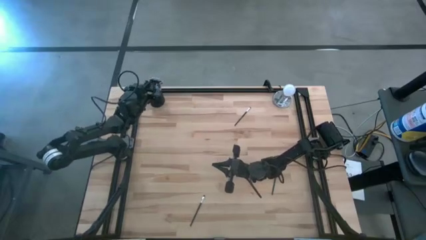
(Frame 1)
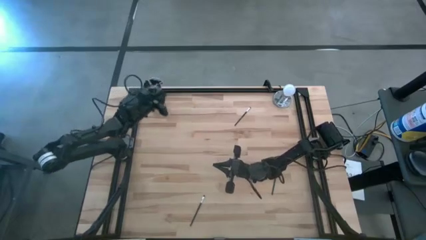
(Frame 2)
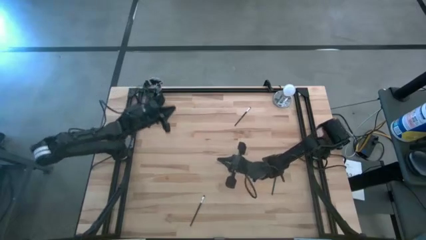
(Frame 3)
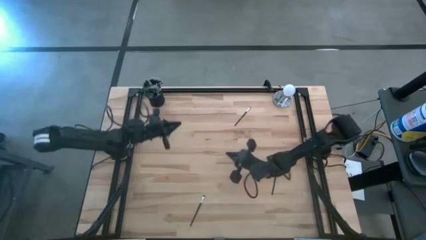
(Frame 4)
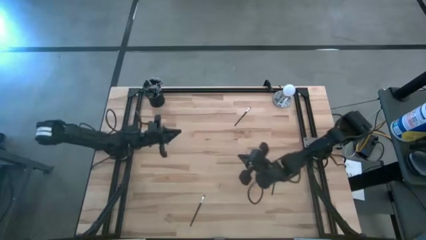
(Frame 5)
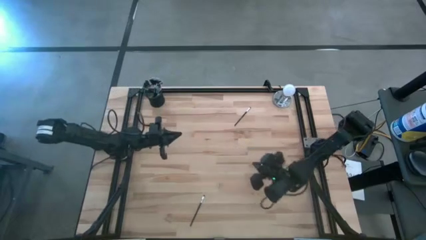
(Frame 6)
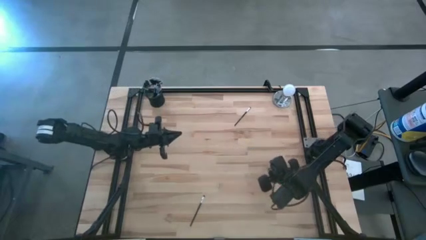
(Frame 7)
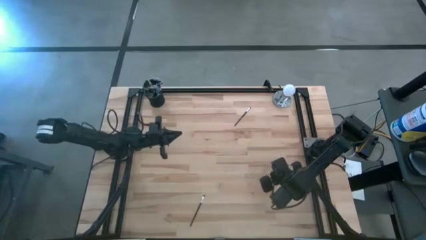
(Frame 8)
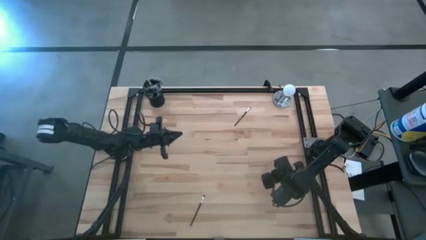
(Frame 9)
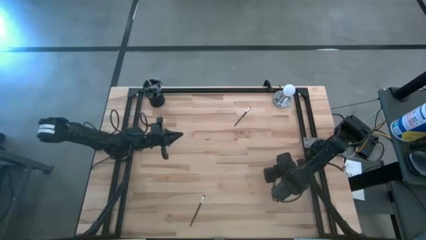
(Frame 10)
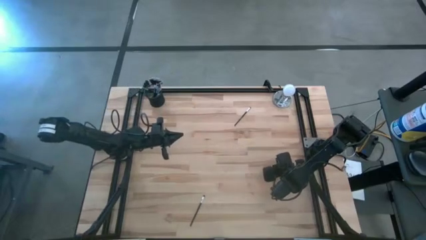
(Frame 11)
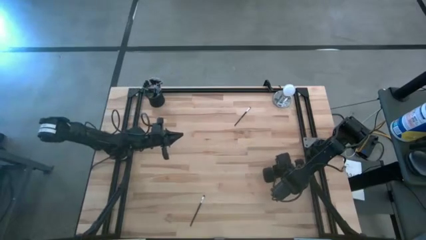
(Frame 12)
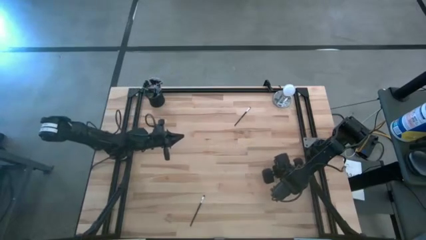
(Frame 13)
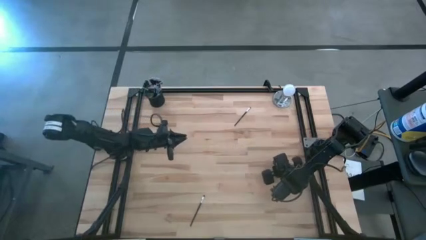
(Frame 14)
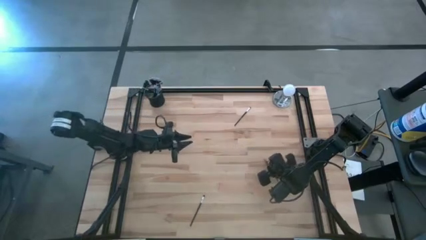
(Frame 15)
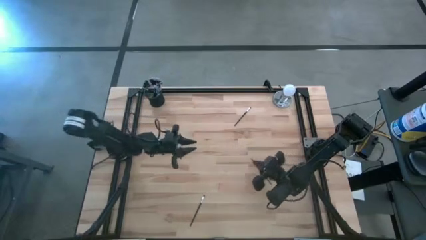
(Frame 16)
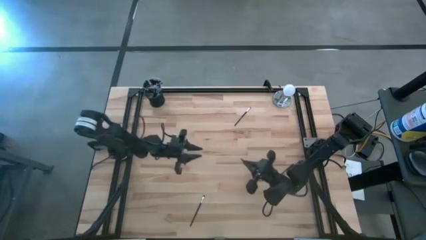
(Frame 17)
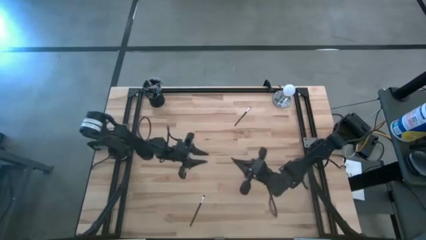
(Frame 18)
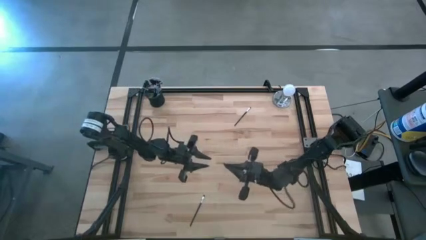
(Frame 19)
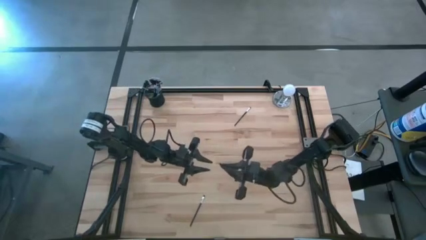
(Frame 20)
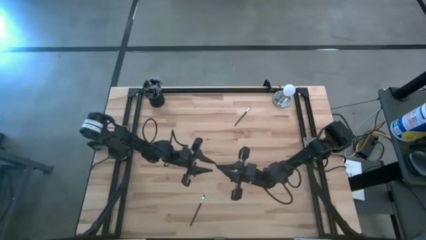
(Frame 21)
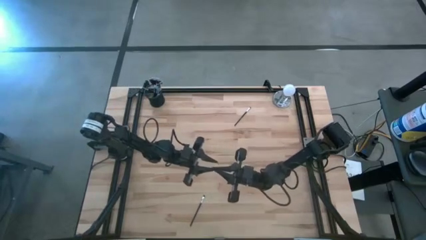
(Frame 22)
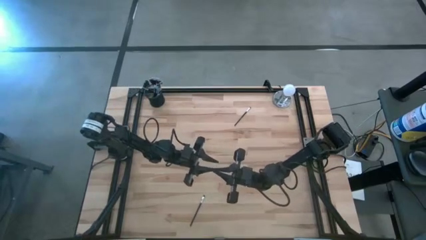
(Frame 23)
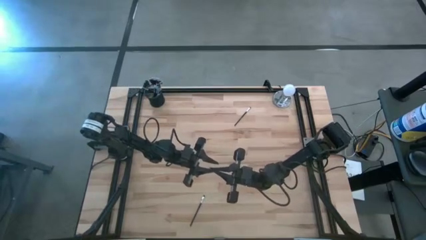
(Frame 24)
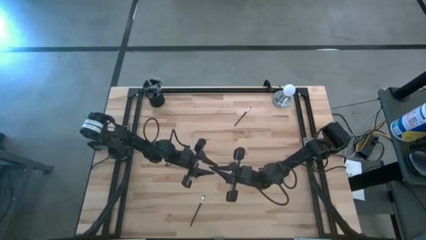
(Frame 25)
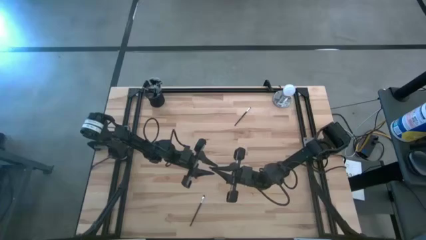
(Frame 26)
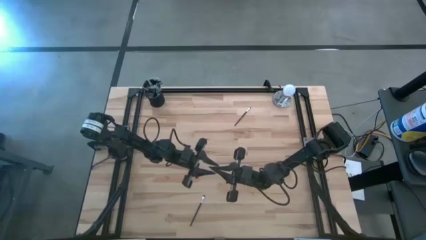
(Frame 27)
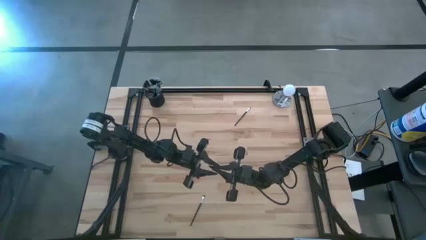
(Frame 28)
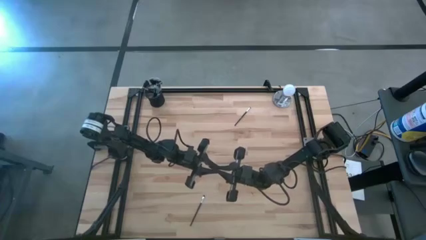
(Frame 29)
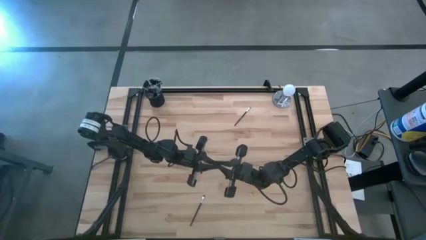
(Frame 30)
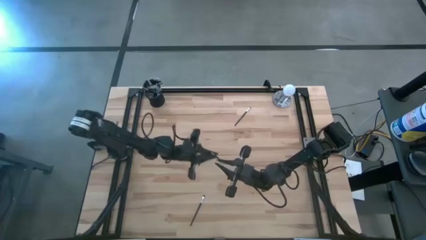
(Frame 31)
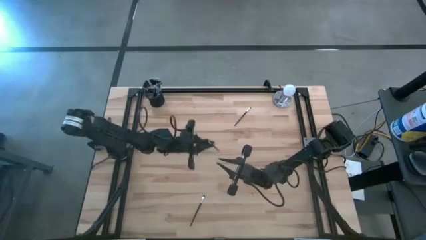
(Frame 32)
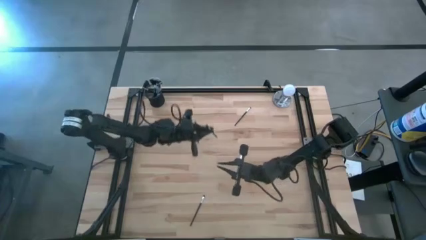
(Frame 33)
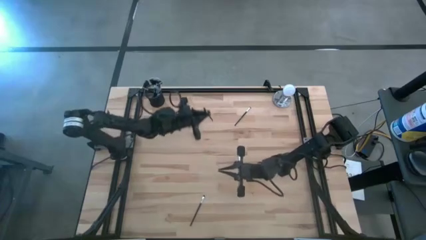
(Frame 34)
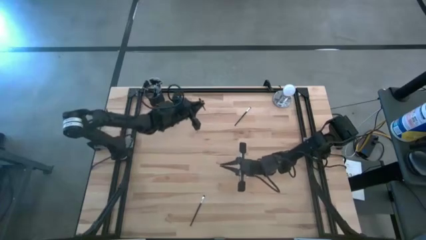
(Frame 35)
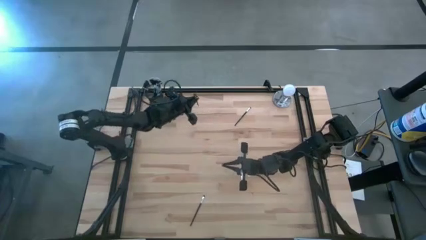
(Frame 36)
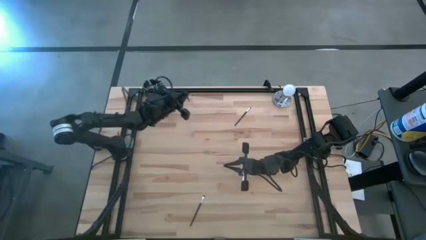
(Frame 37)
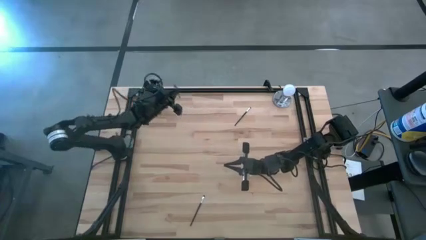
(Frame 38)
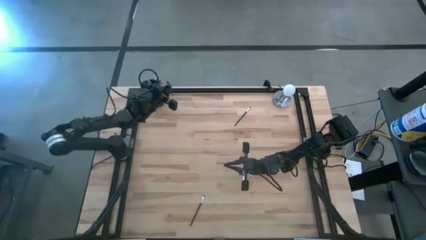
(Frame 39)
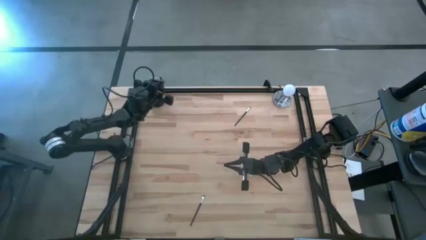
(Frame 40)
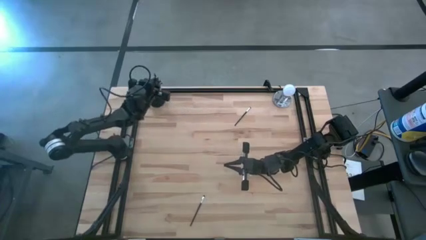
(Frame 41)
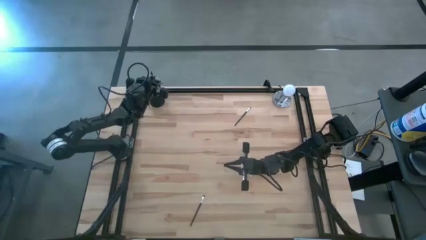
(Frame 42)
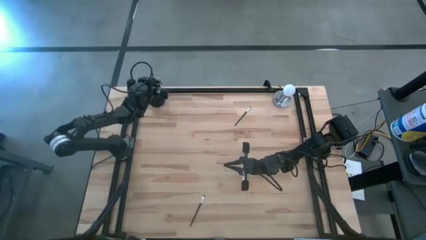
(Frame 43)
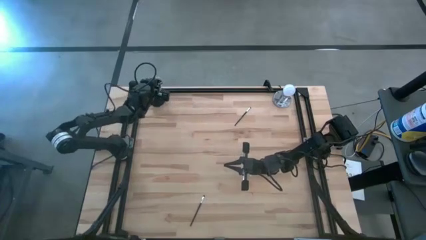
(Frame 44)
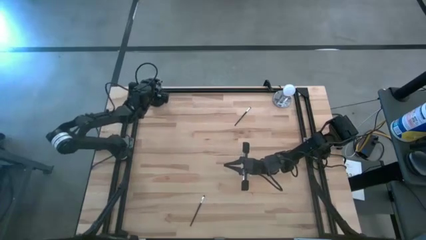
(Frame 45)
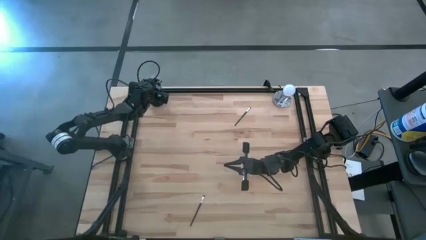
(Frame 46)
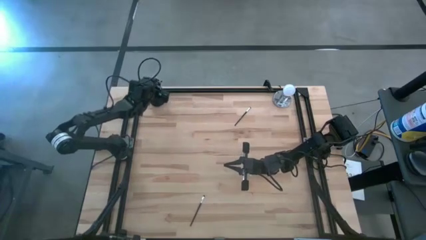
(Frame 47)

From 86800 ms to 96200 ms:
Task: Pick & Place Makeup Supplies
Put the right makeup brush into the makeup holder

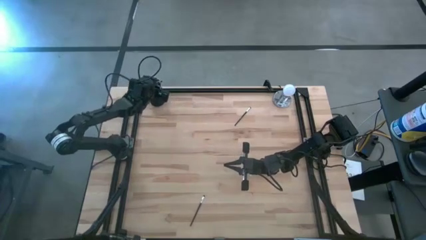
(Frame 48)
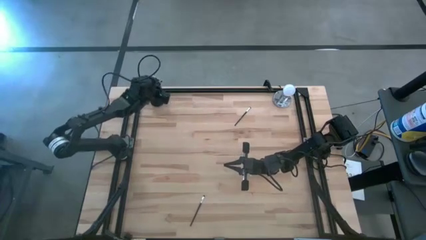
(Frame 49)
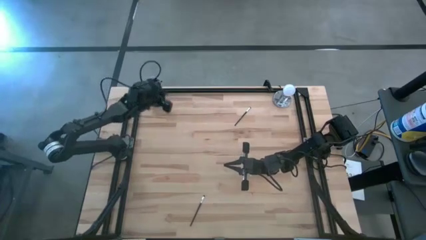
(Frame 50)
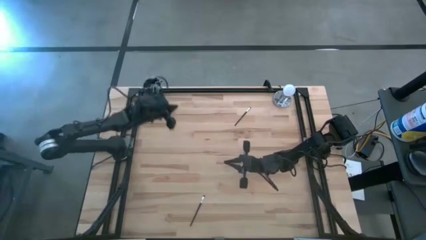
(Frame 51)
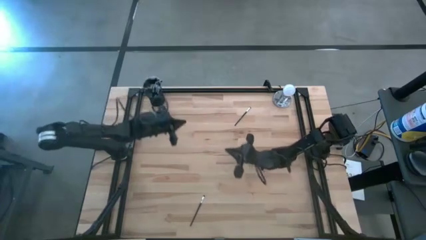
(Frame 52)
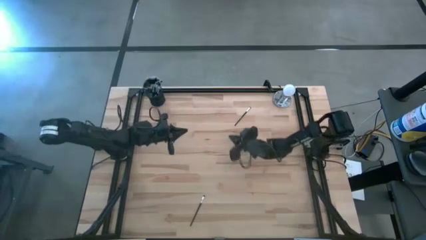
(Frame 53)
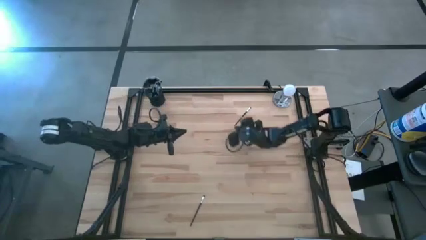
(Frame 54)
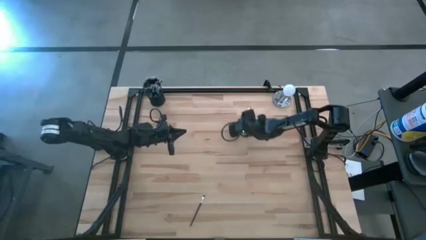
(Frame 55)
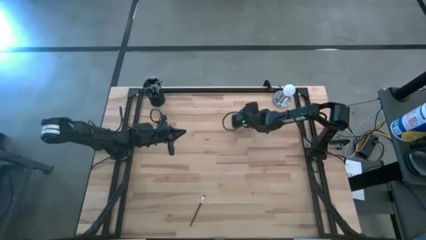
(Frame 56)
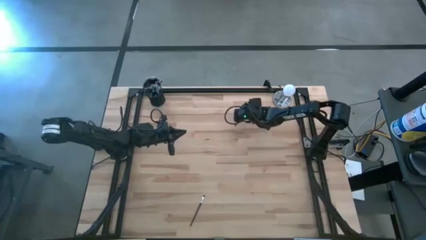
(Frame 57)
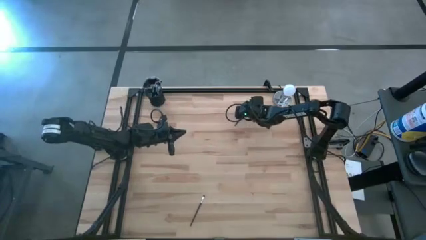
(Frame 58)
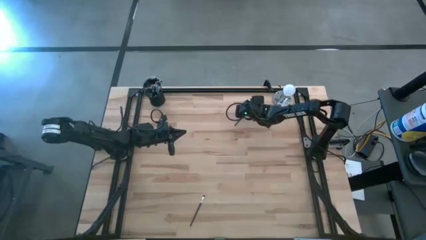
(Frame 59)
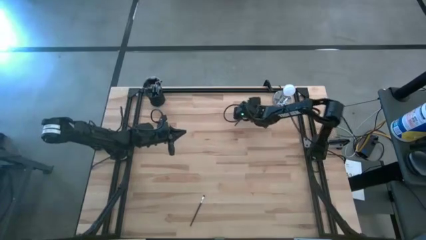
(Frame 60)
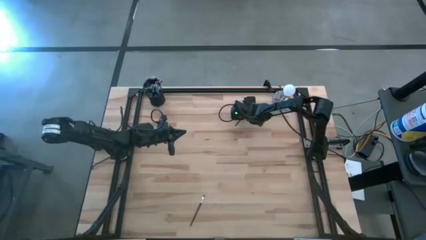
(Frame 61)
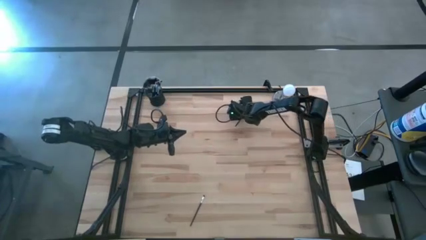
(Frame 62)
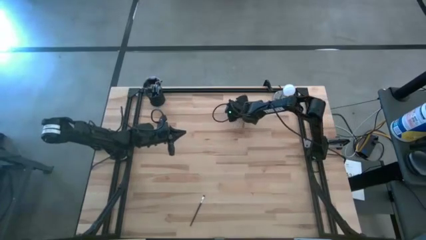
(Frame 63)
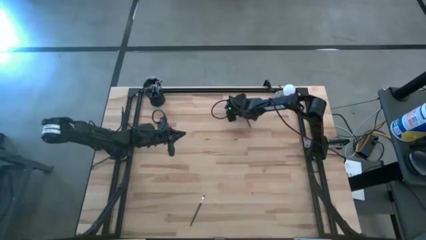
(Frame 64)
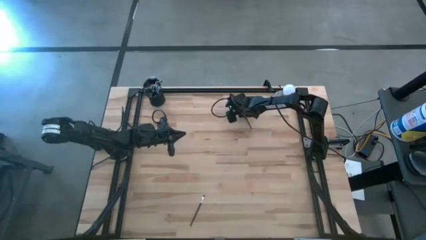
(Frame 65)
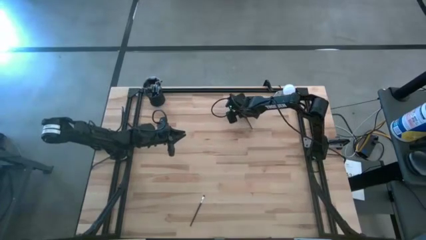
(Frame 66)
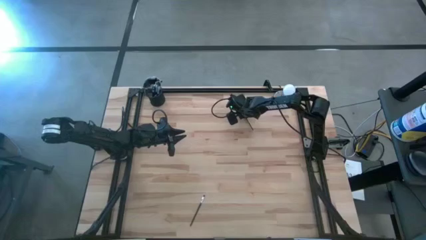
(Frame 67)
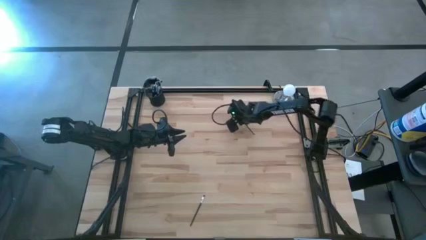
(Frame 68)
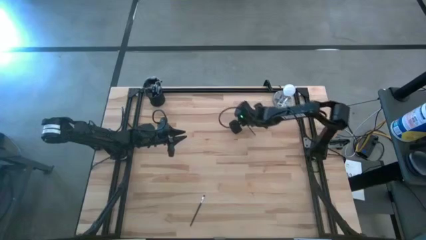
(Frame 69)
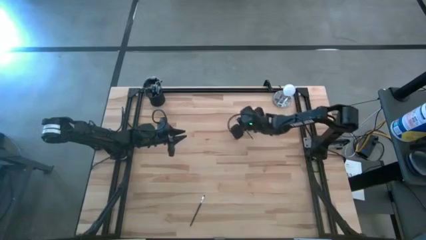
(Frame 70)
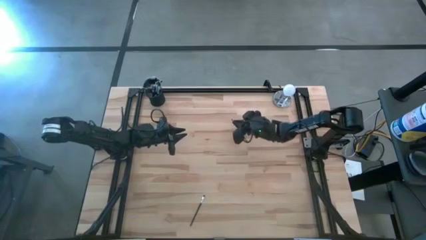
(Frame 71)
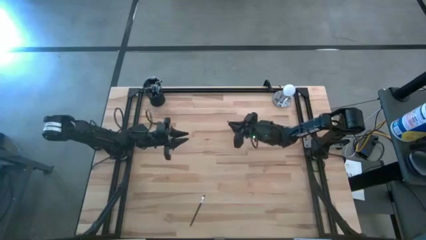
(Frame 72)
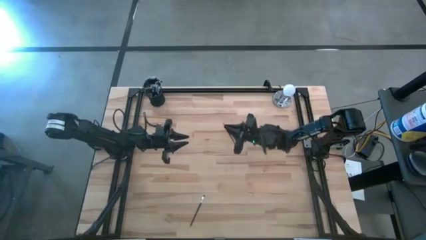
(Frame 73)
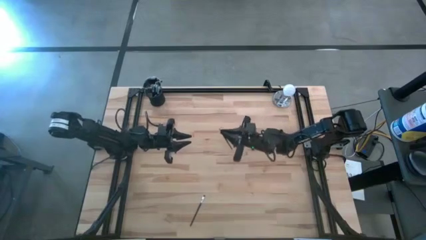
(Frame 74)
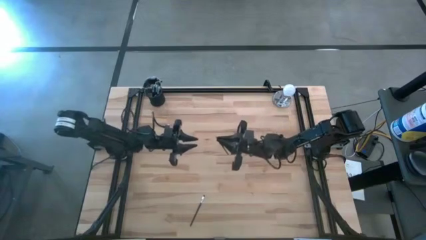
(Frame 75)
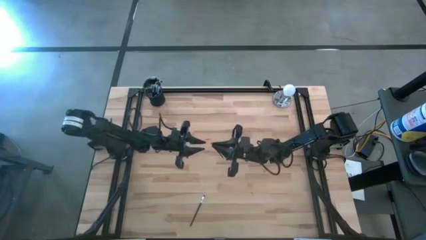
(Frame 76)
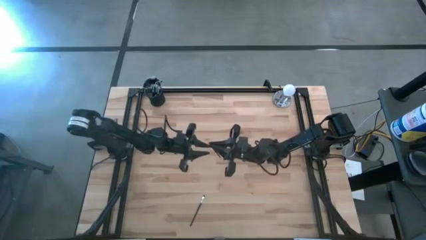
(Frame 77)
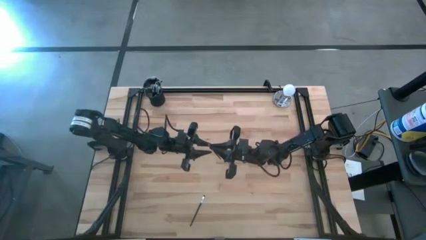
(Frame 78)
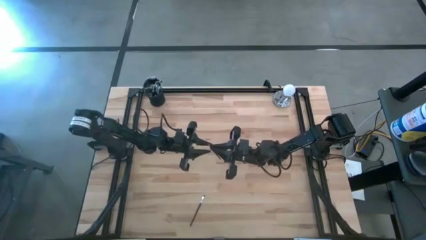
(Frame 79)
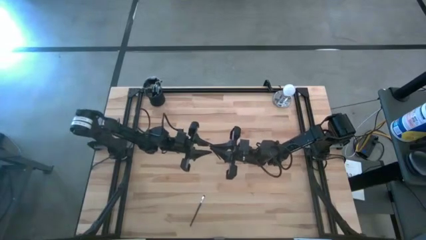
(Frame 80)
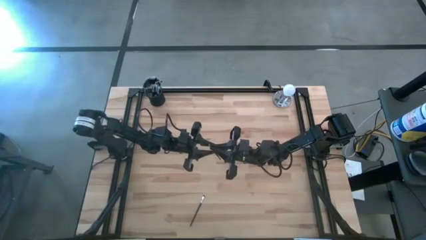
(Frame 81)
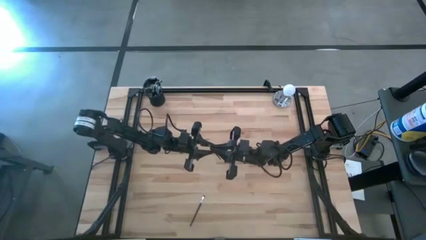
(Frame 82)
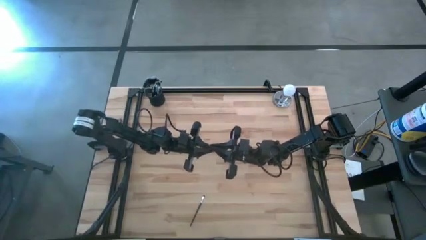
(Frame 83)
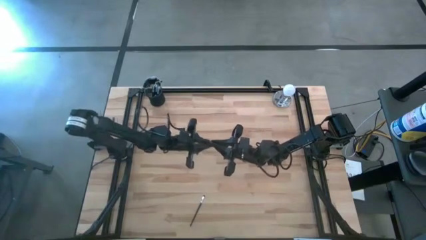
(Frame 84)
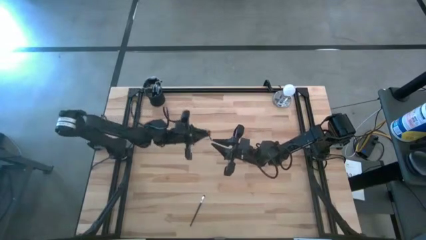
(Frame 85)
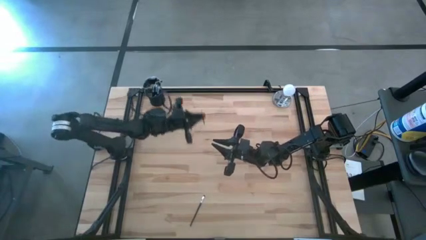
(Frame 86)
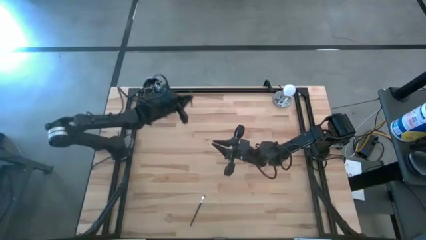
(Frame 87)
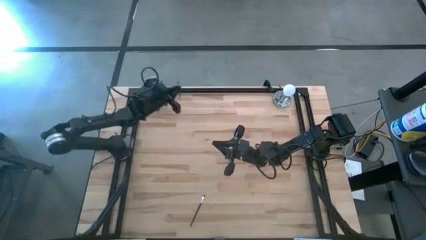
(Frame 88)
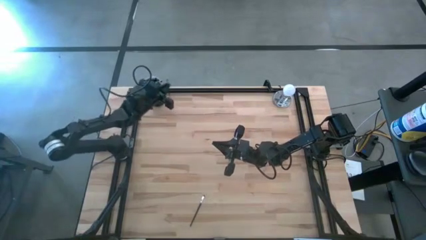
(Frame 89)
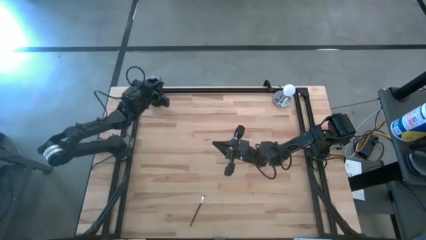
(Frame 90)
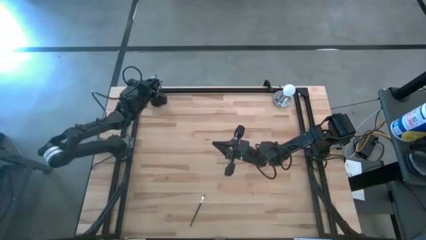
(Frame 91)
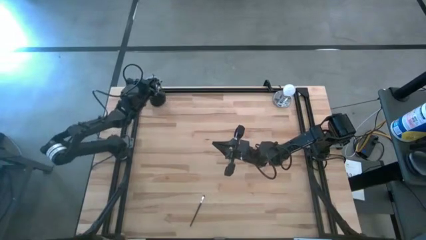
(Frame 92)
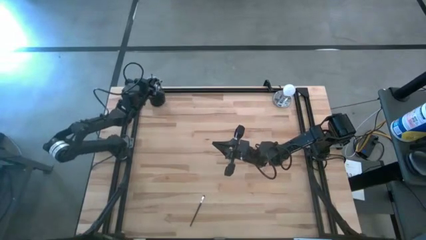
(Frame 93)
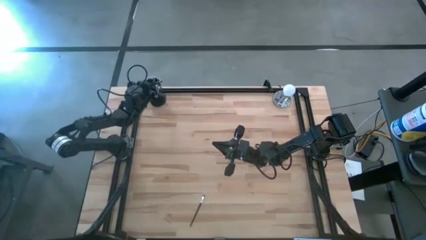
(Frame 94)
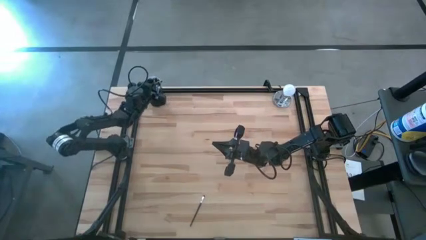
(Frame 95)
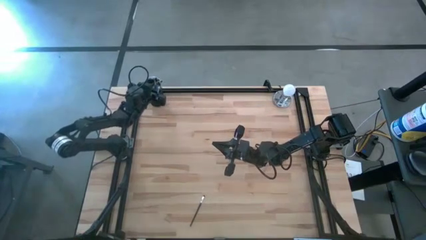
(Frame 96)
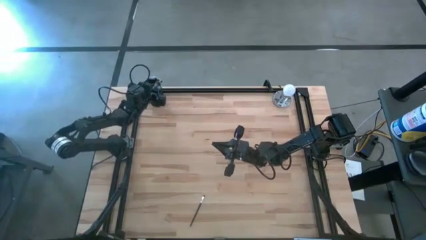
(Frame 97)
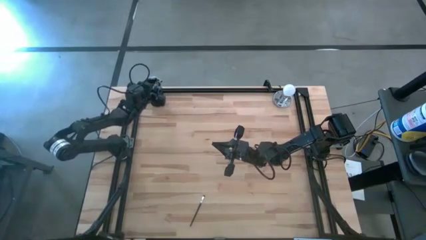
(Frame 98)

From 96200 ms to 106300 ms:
Put the top makeup brush into the makeup holder
